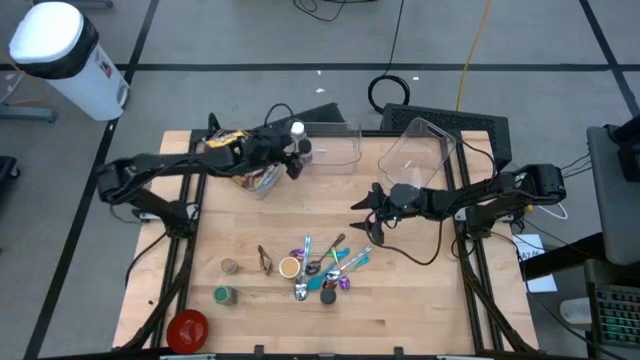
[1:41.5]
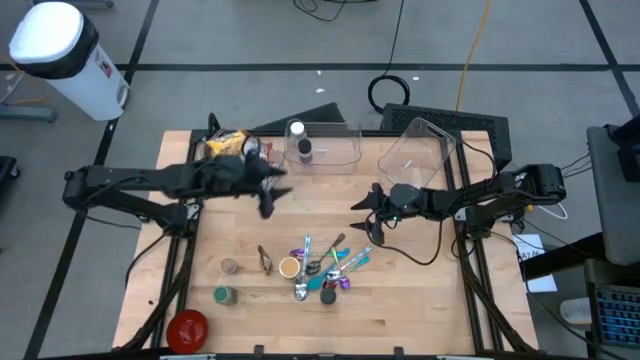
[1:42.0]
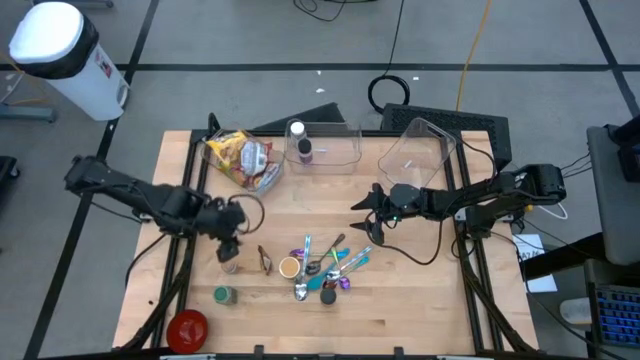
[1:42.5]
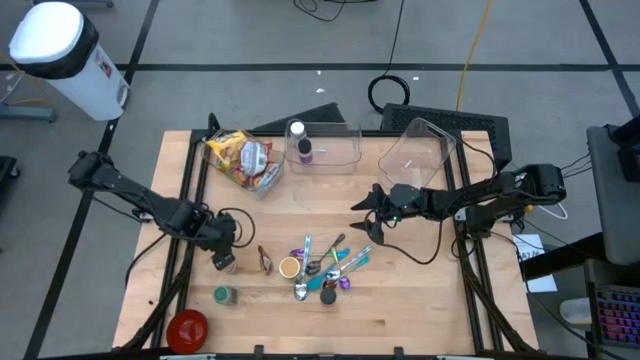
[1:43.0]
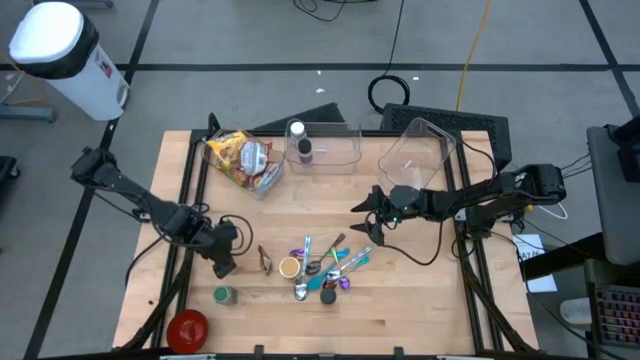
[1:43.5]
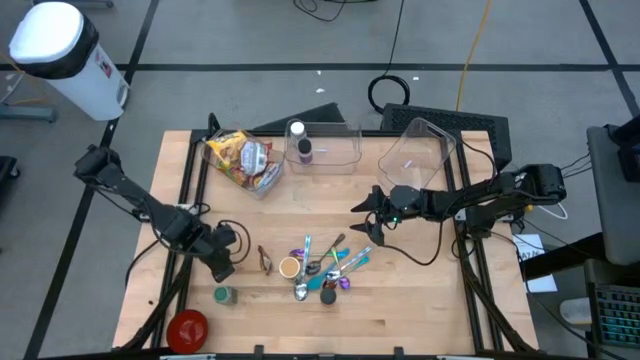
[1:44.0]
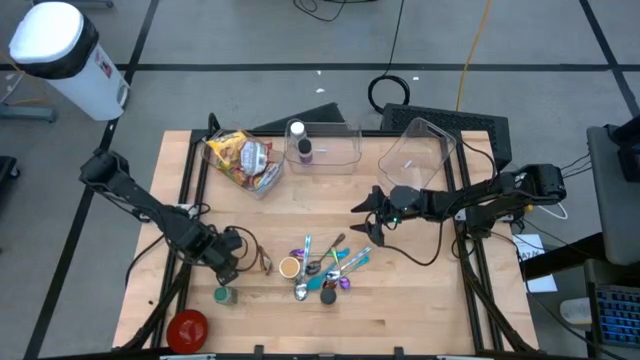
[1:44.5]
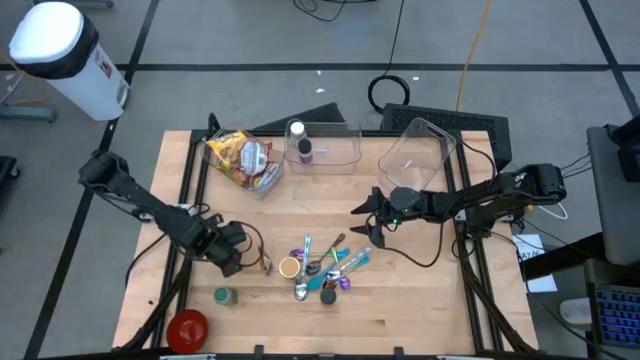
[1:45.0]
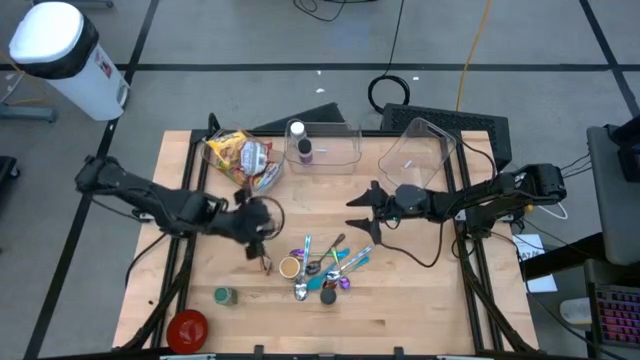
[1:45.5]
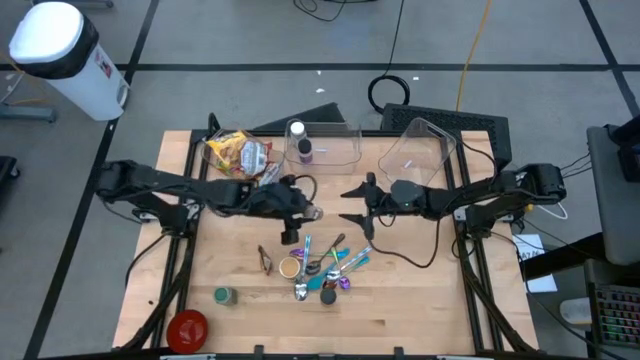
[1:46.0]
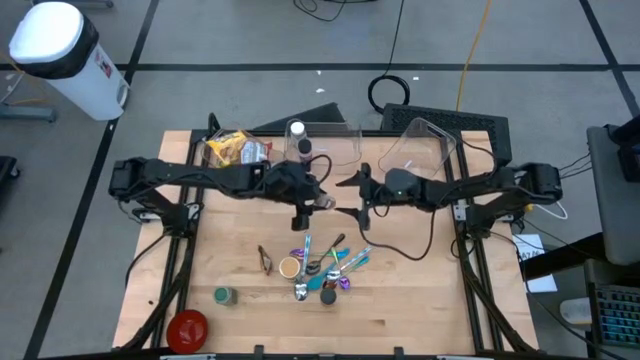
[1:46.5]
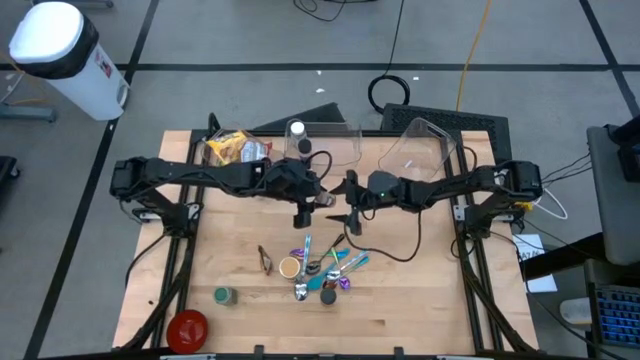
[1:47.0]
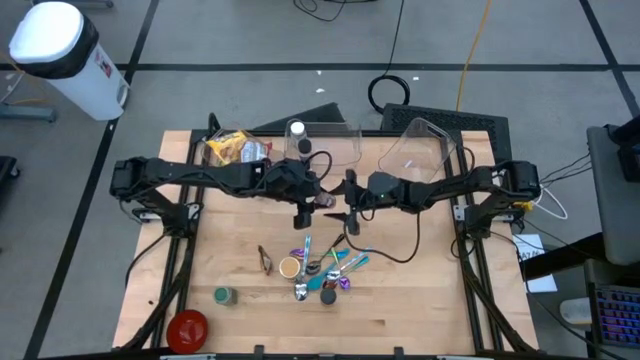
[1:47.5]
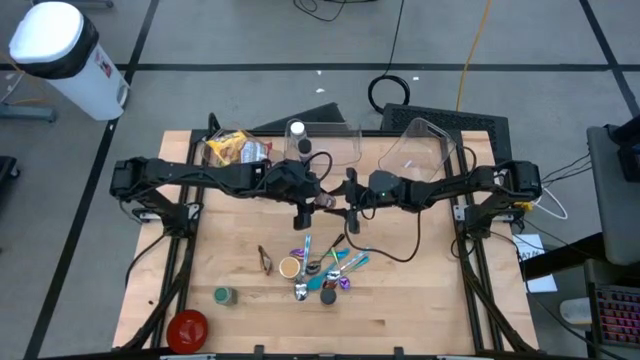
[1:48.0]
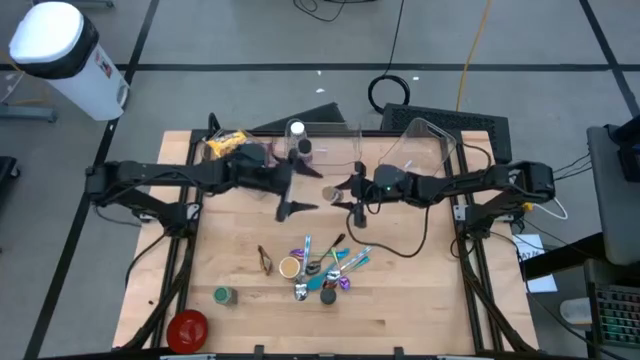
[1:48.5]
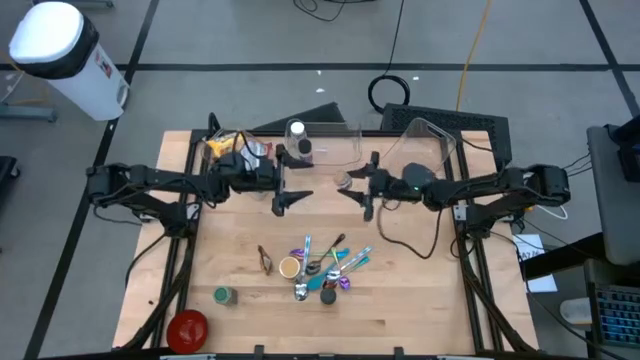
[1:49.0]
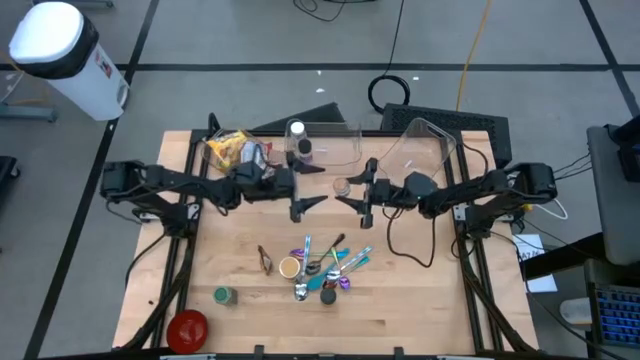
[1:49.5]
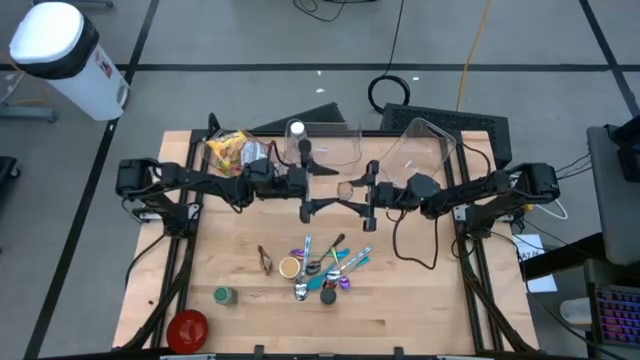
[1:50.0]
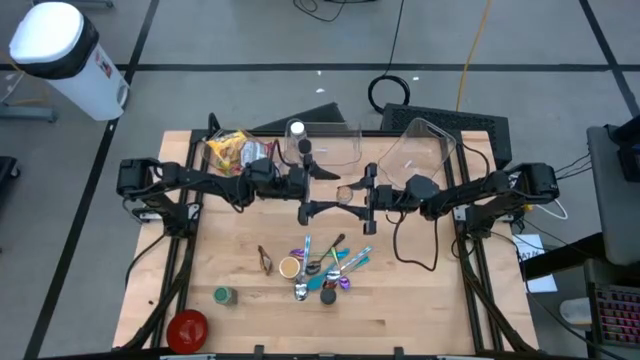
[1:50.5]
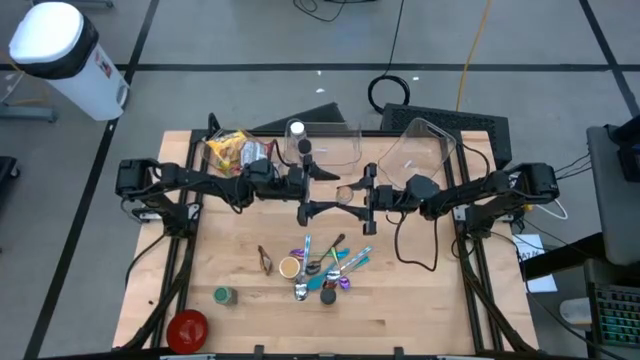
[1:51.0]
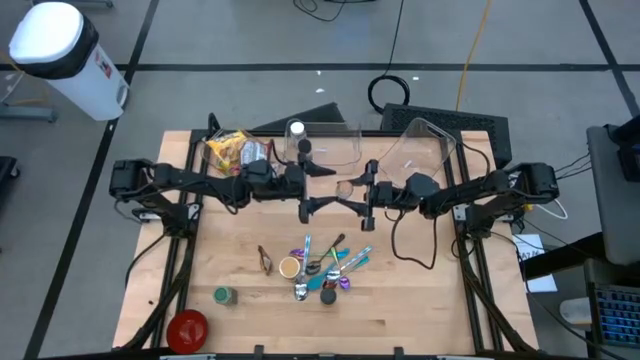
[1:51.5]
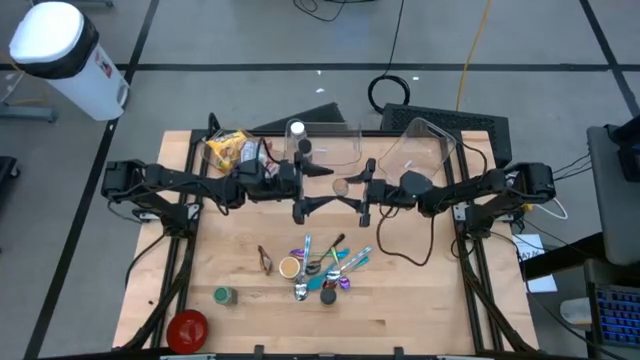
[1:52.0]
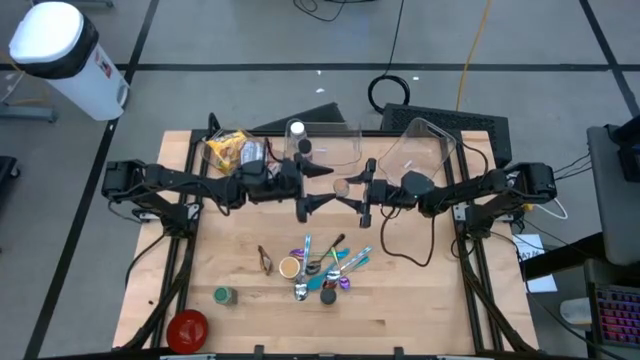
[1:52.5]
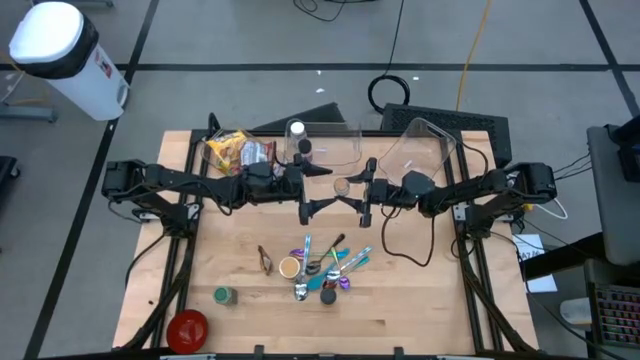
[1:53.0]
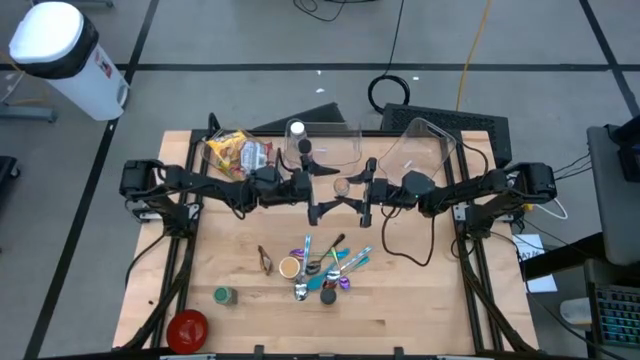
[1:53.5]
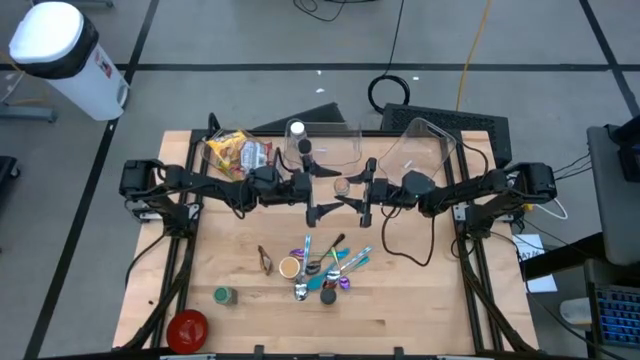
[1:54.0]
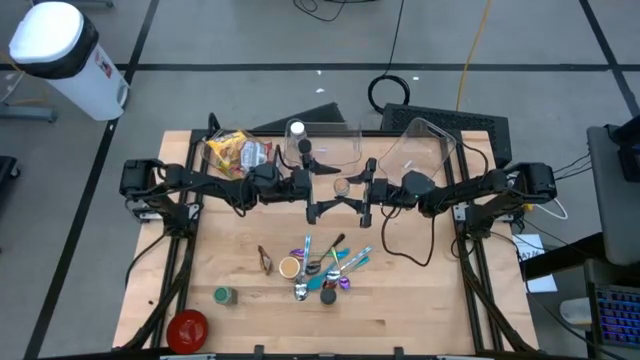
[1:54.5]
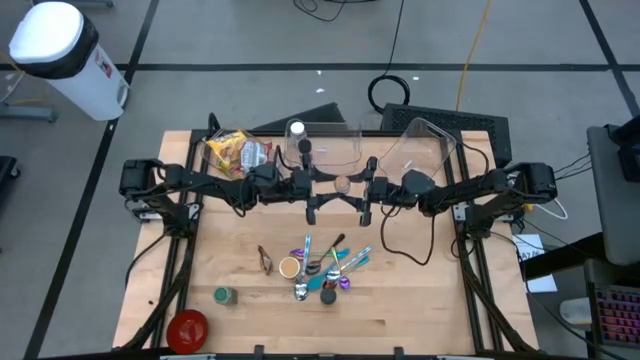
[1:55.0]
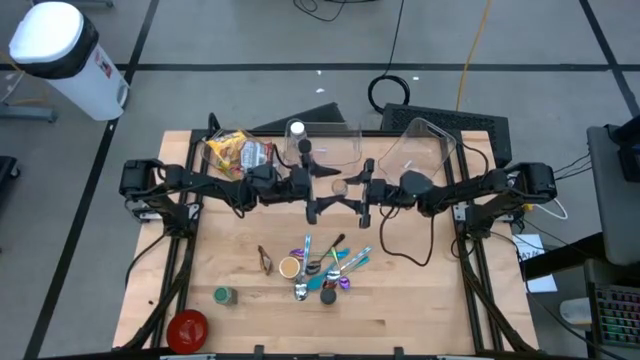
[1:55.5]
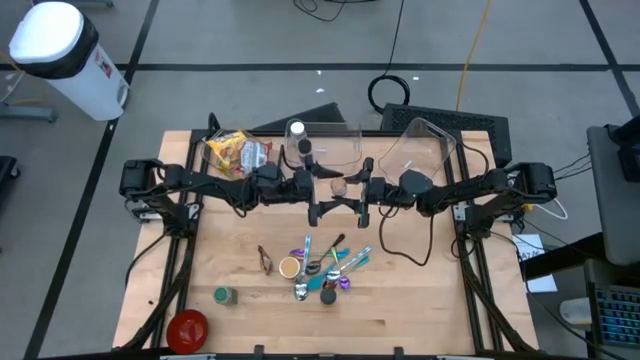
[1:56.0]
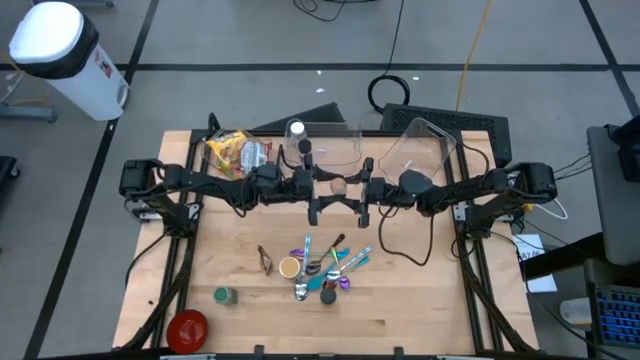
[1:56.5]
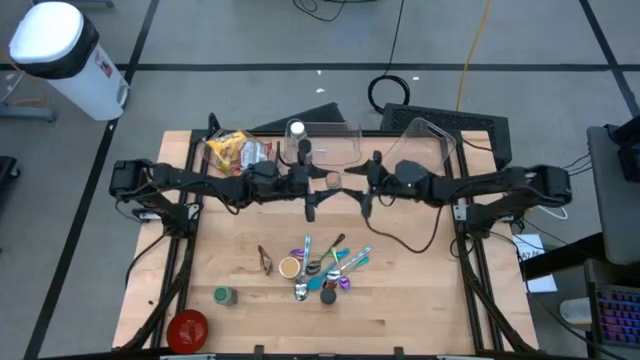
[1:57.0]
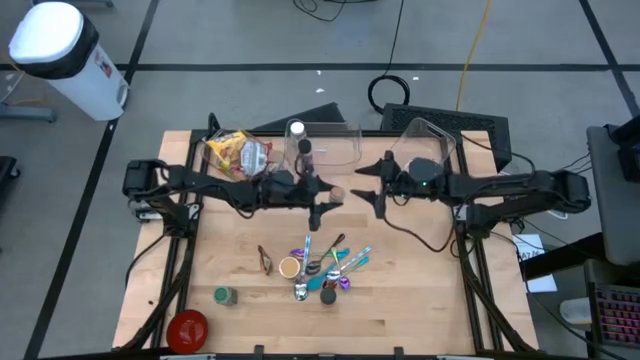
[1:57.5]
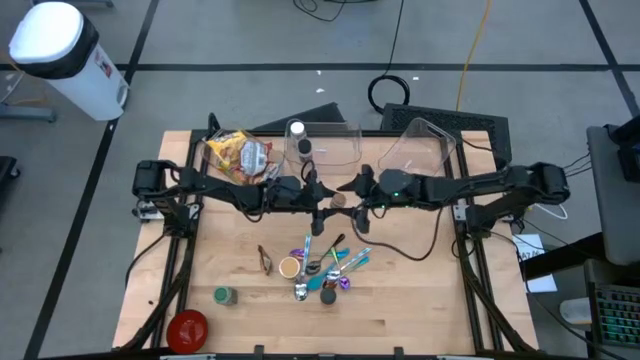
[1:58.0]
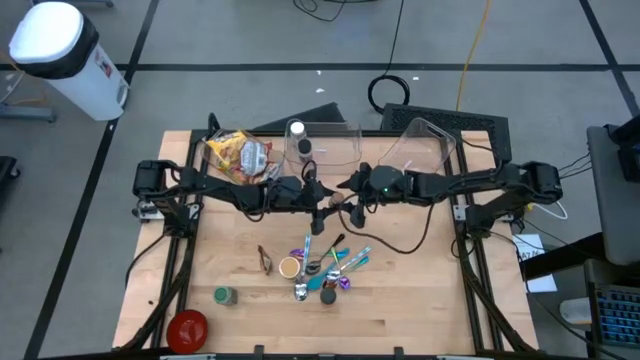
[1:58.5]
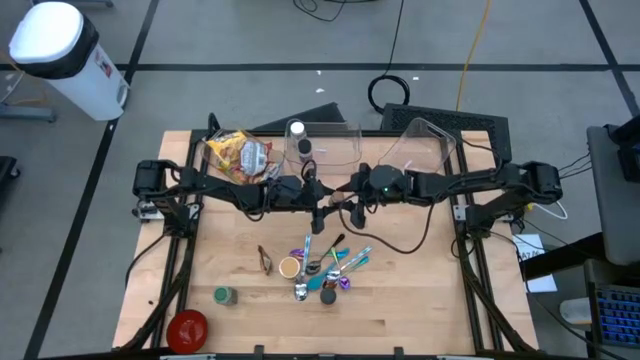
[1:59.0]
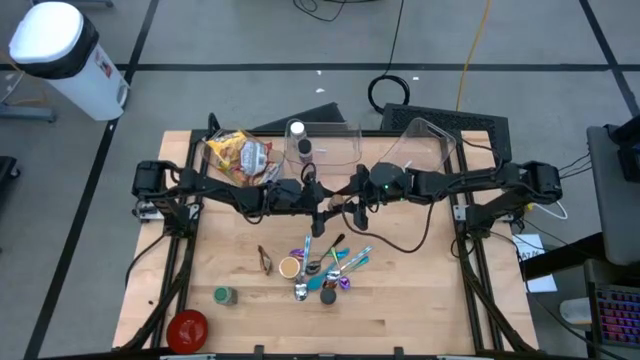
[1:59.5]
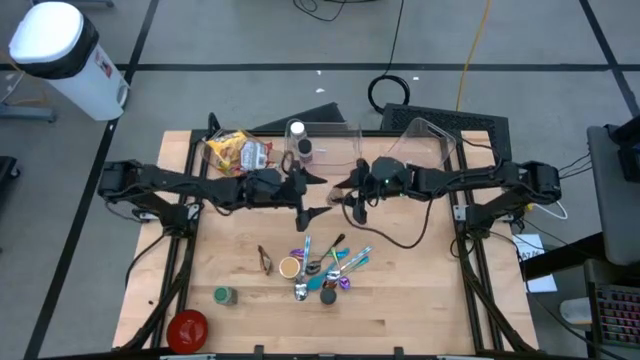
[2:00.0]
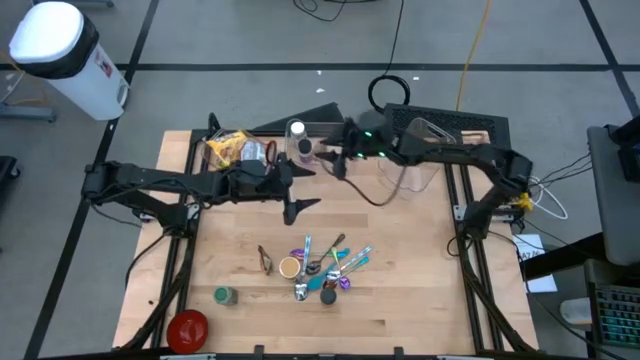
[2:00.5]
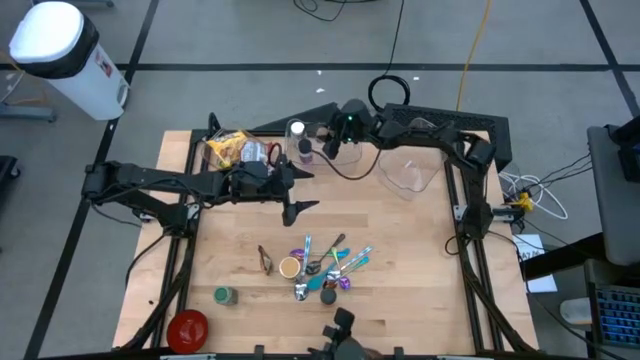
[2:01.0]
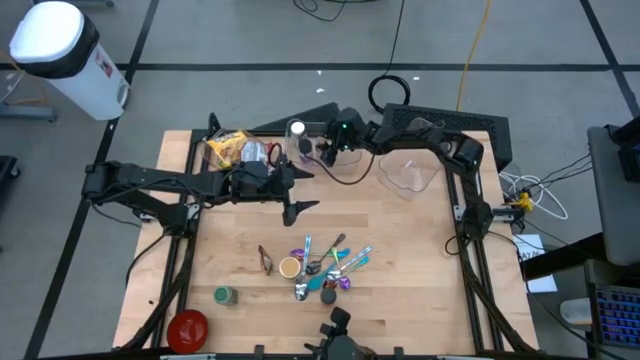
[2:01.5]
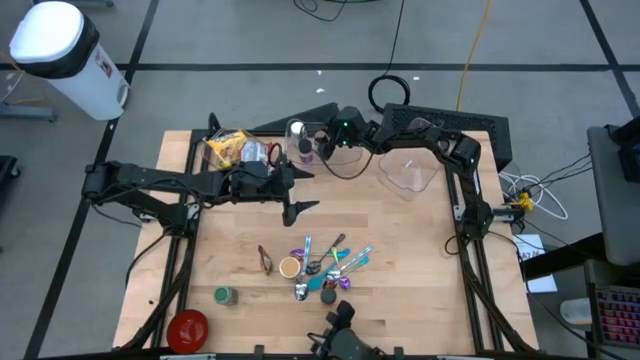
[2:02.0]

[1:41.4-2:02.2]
Task: Pick & Place Food Item
Put the brown seasoning bottle into the middle transparent bin
